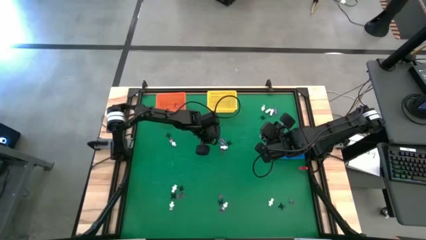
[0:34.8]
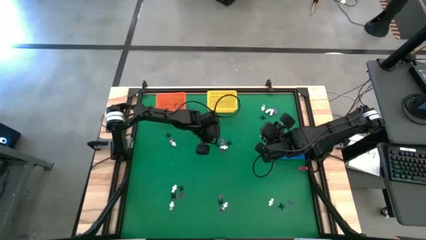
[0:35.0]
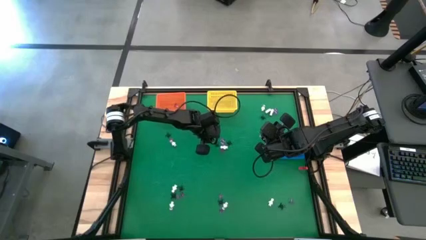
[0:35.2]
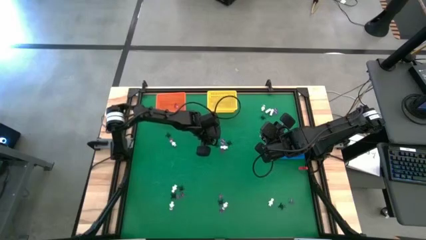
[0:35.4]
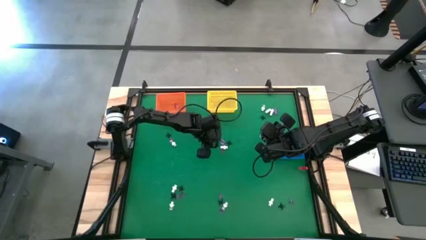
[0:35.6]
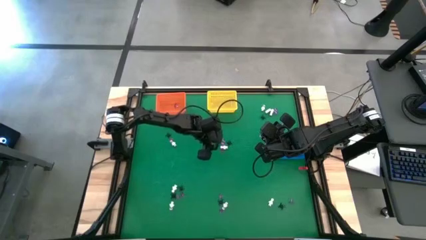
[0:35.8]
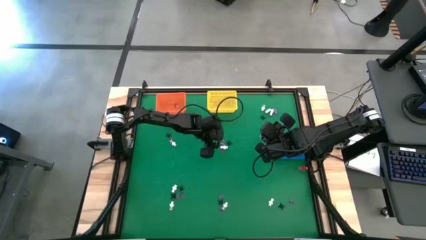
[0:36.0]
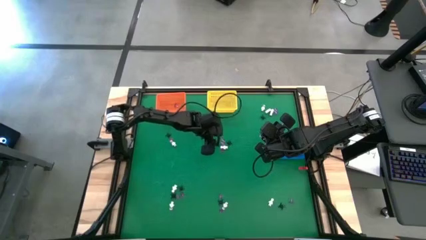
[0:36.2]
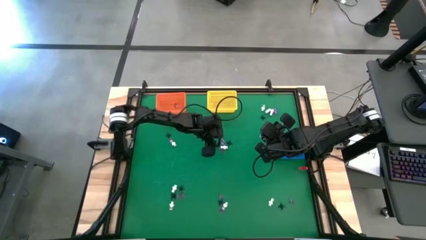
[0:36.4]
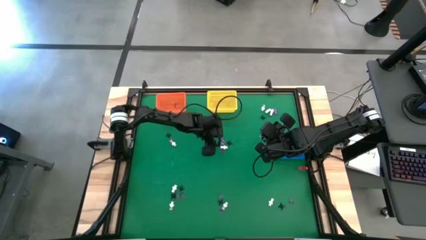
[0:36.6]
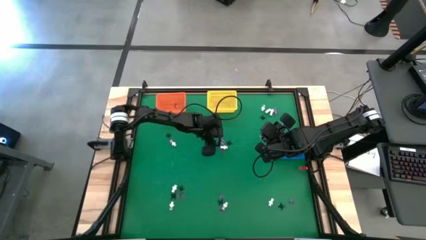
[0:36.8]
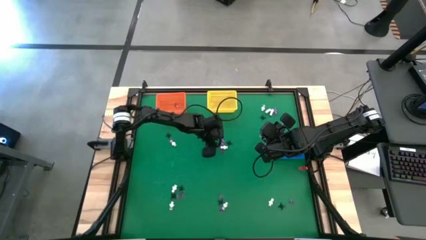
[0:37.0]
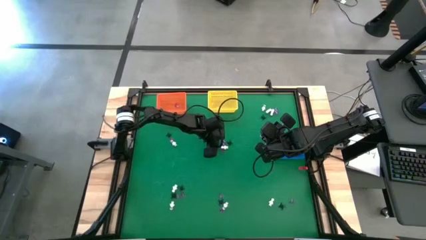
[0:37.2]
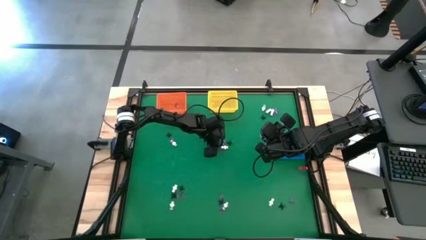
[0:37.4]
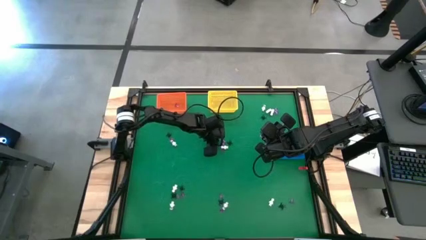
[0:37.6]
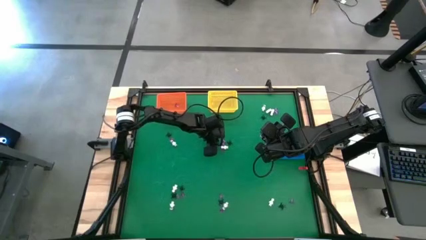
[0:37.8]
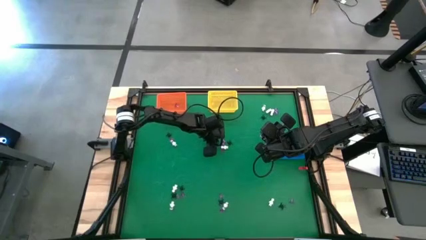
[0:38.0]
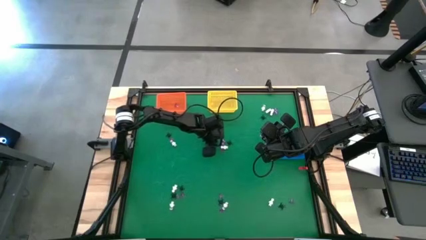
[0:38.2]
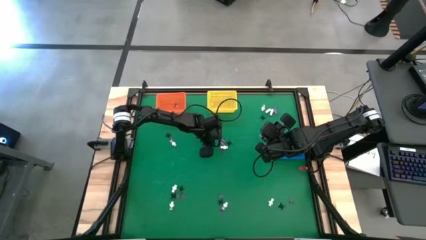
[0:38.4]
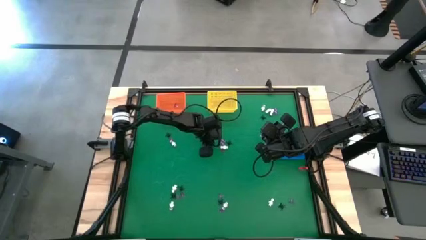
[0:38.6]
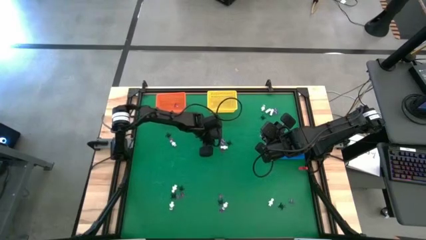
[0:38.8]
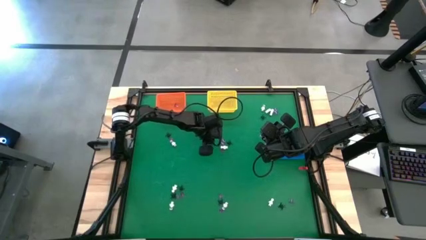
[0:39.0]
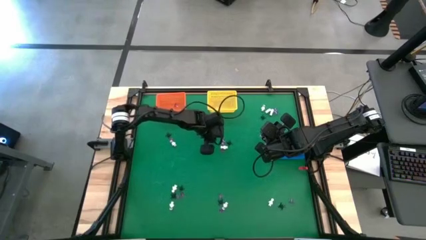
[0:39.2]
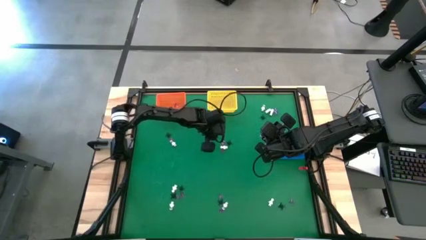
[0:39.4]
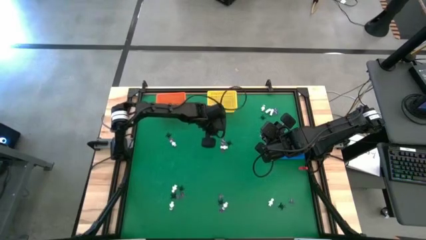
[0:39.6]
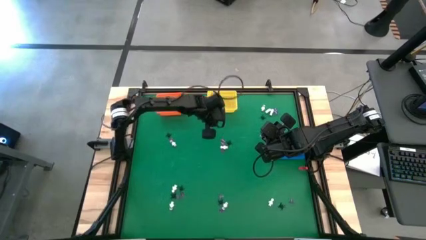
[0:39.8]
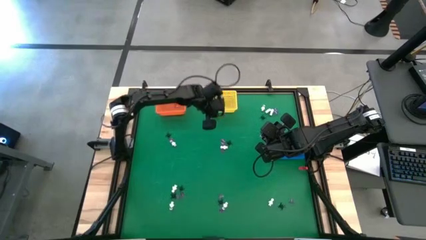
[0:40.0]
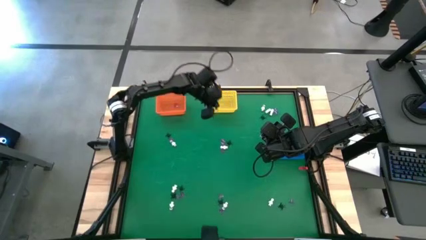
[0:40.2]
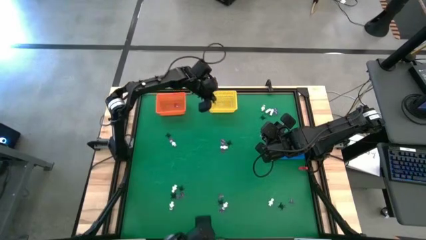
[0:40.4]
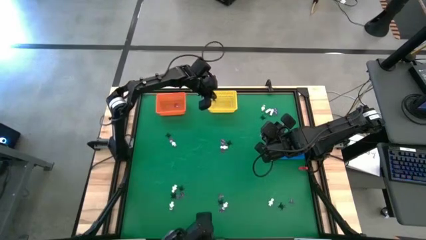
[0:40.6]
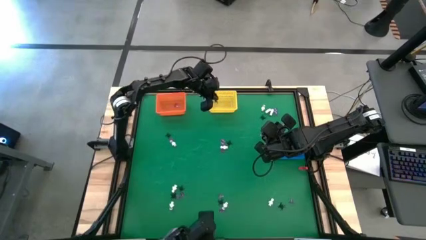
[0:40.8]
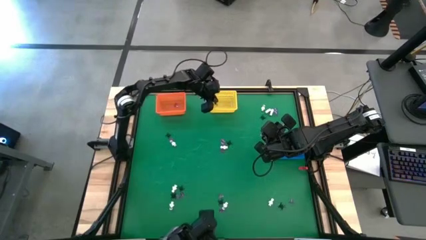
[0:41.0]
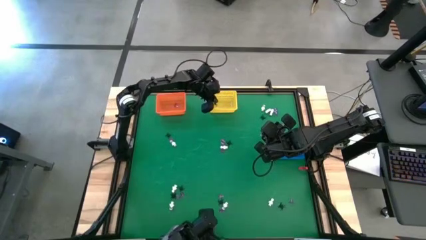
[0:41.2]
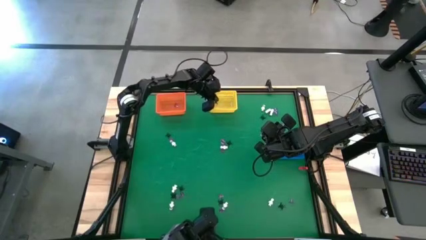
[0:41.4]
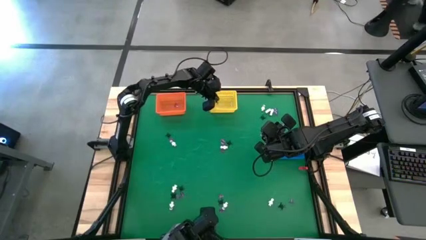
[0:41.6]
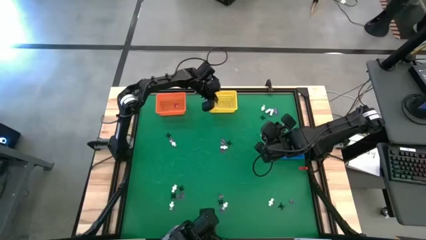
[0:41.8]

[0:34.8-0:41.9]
Task: Sort Halloween decoration
Put the black spider toy into the yellow basket

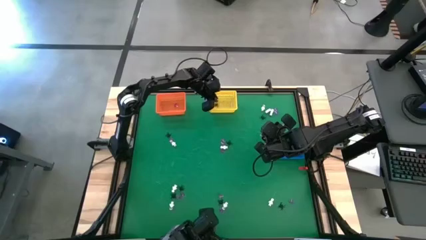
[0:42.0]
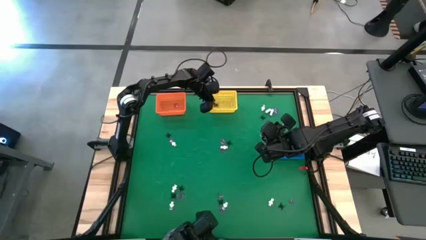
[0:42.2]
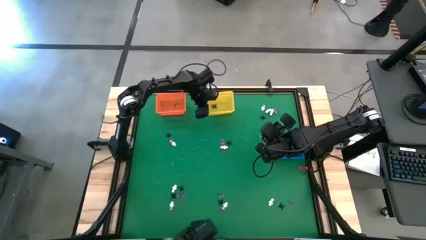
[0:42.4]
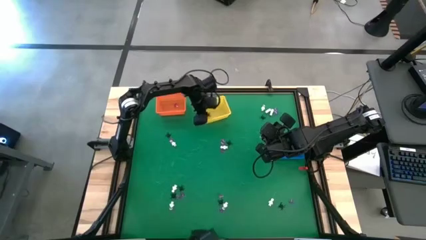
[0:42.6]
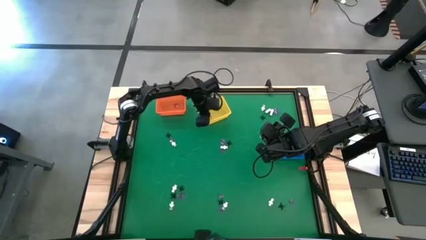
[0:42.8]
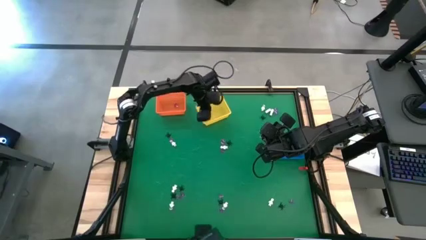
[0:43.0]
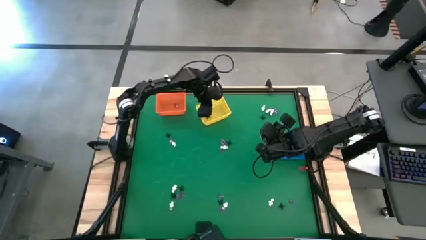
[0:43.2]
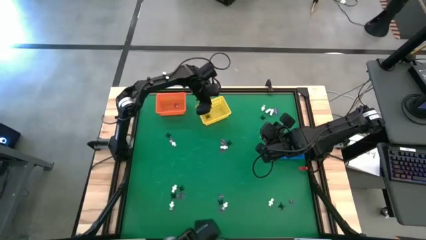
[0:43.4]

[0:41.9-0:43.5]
Put the white skeleton toy into the blue basket

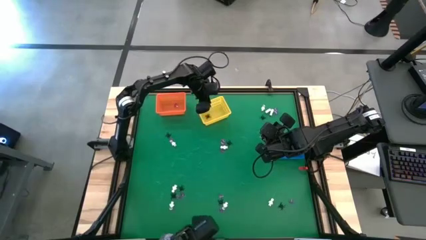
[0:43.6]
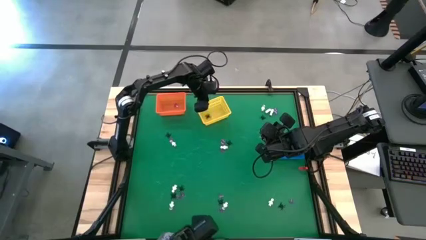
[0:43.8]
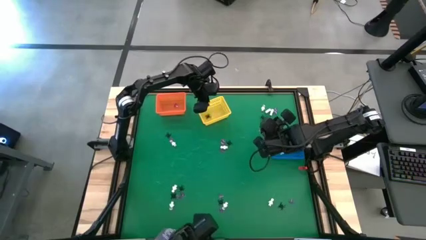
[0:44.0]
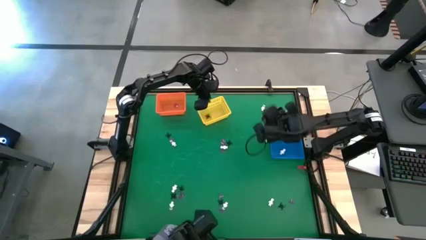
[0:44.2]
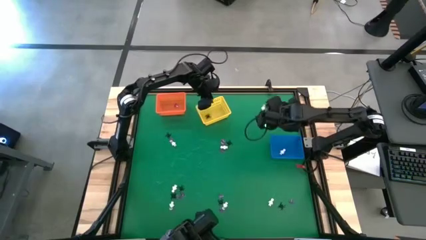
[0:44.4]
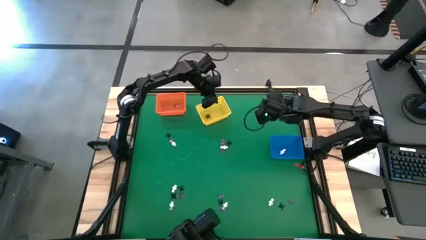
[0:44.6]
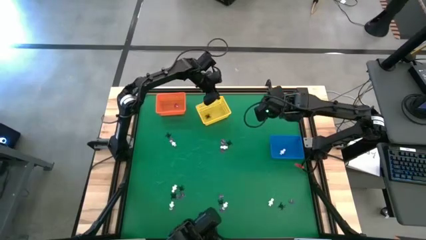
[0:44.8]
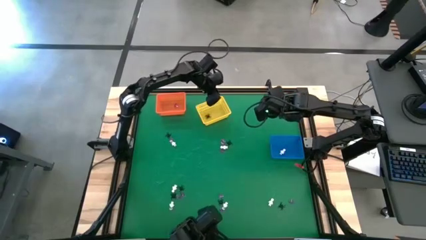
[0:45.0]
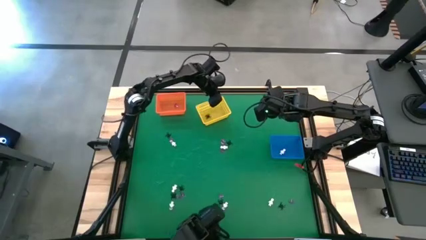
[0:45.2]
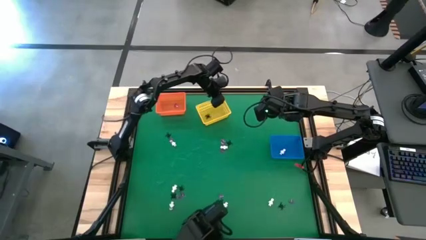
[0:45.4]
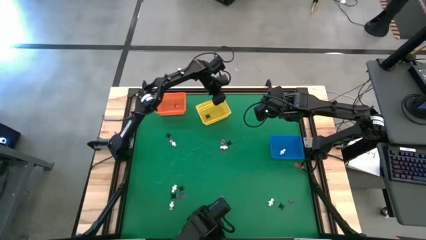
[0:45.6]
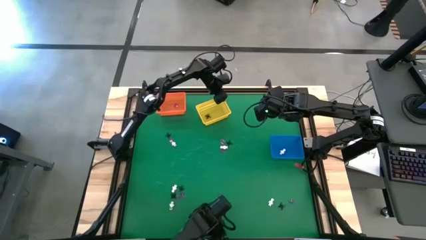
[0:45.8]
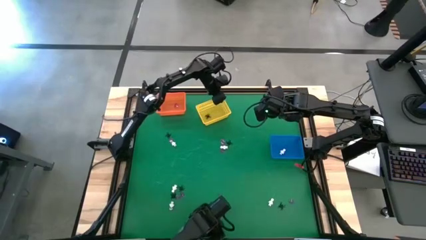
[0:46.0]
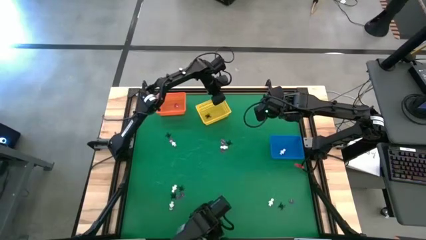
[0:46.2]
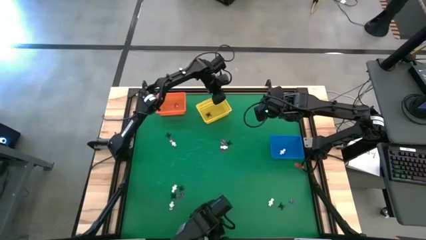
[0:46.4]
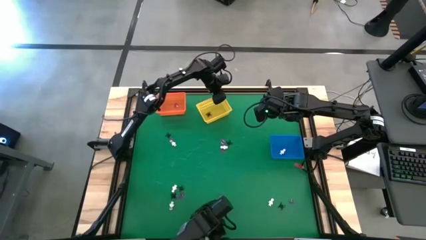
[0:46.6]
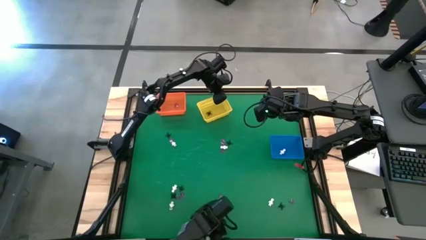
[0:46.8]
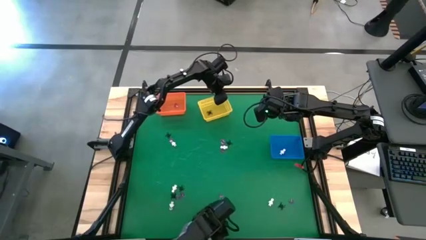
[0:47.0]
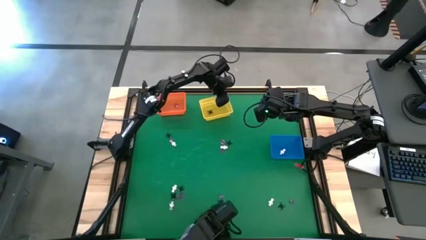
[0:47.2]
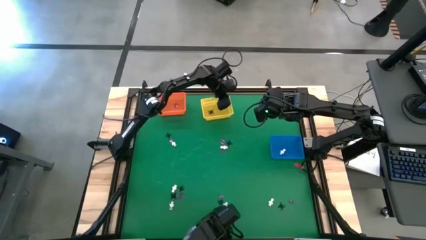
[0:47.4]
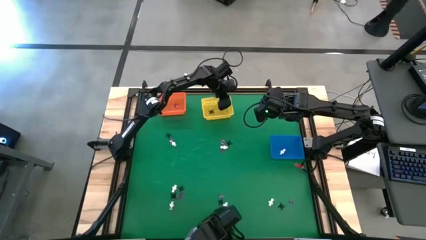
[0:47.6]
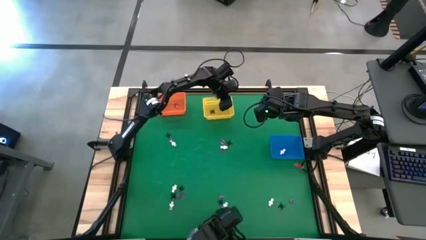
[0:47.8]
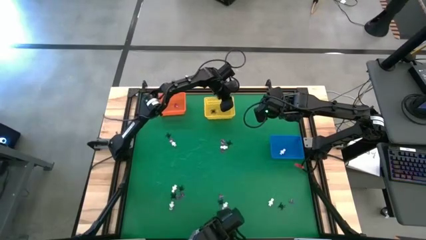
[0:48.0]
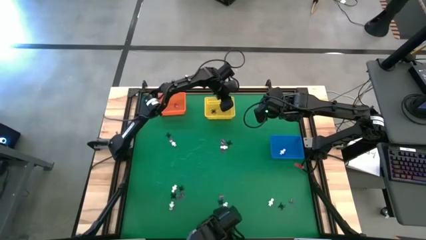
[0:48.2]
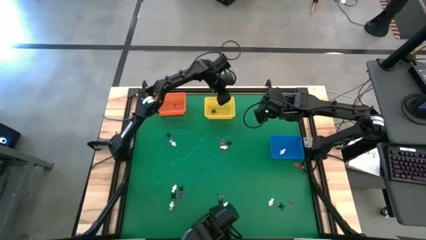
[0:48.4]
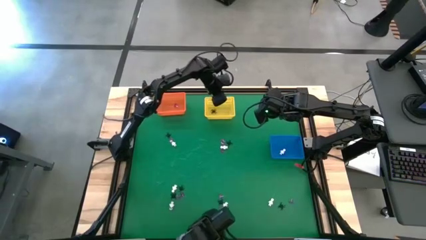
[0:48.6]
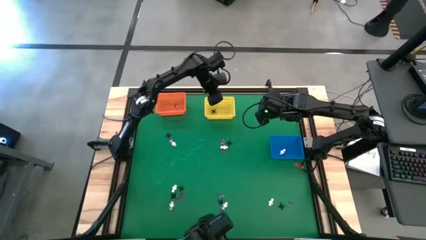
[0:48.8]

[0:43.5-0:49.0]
Adjust the yellow basket

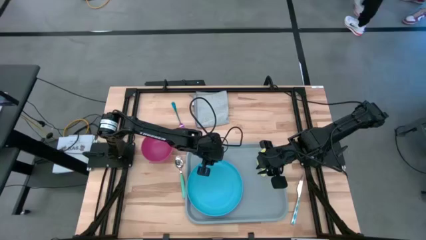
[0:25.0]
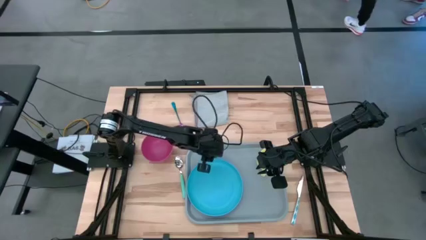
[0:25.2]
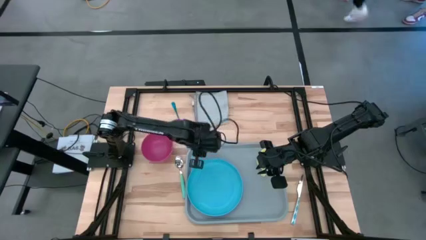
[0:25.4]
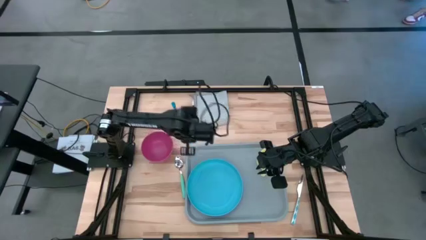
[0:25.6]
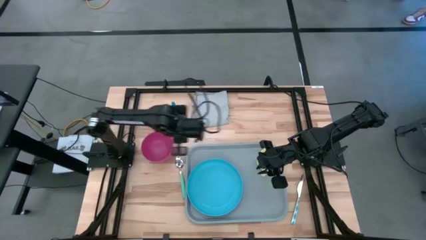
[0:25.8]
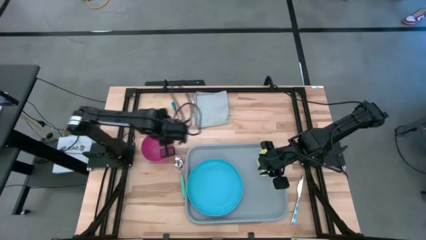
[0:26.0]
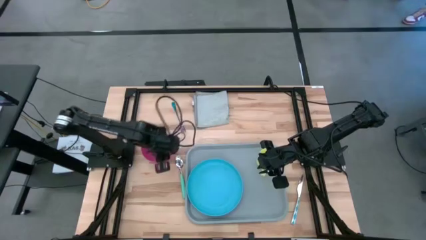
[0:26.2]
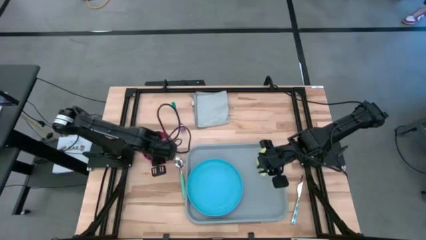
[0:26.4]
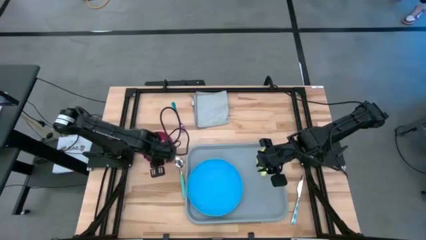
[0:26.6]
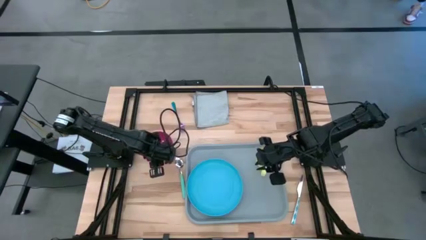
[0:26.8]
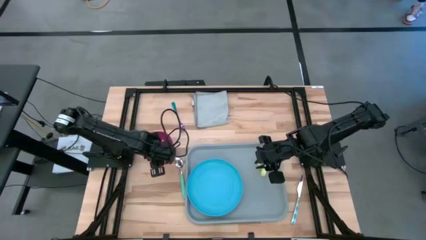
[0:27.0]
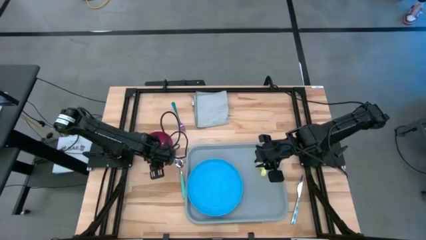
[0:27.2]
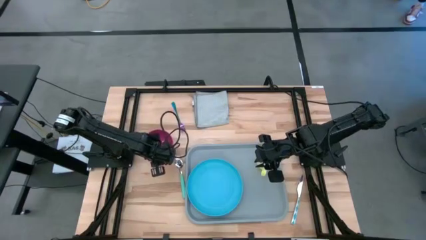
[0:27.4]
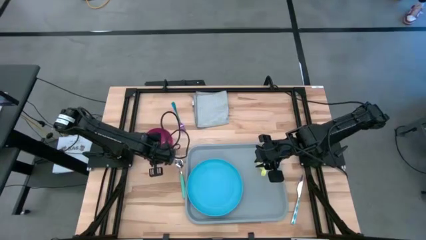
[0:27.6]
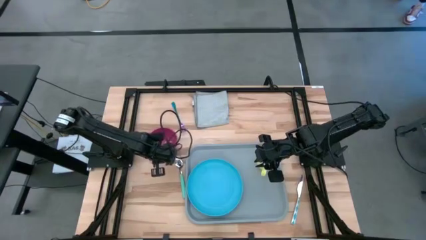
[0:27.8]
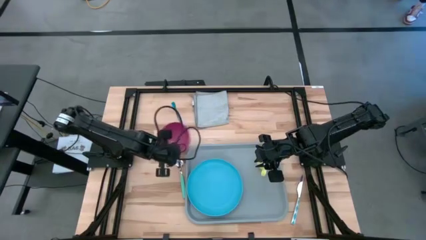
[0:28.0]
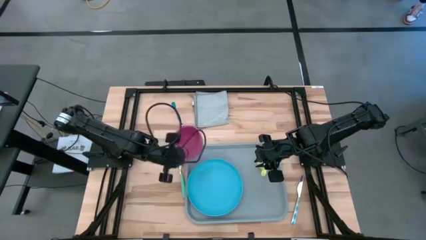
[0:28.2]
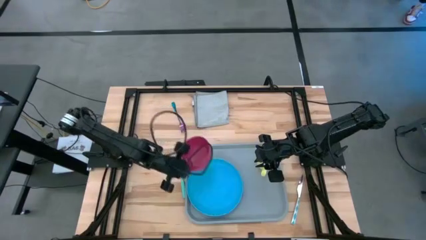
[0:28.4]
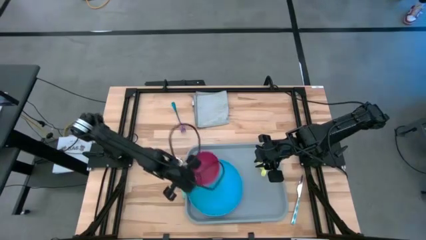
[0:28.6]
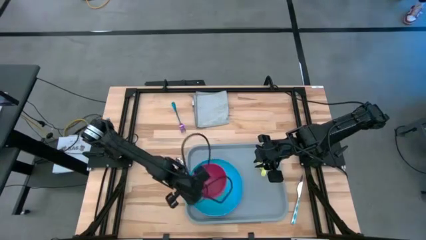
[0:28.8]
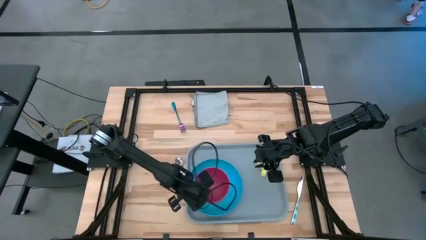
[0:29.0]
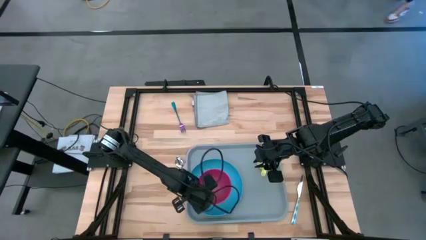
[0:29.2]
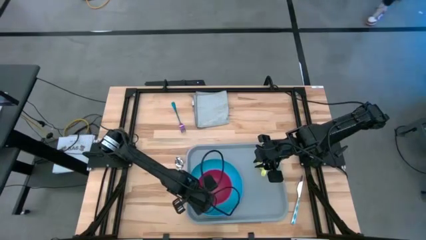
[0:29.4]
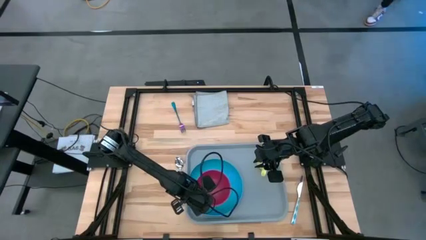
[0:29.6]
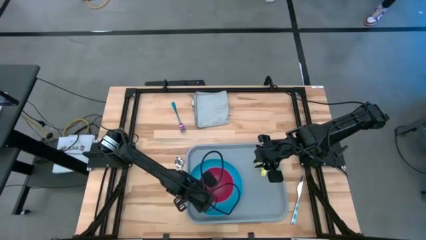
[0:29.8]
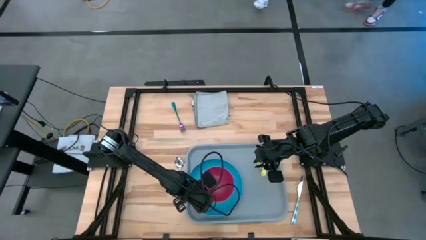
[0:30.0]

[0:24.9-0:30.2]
Task: Set up tray
Put the red bowl on the blue plate
